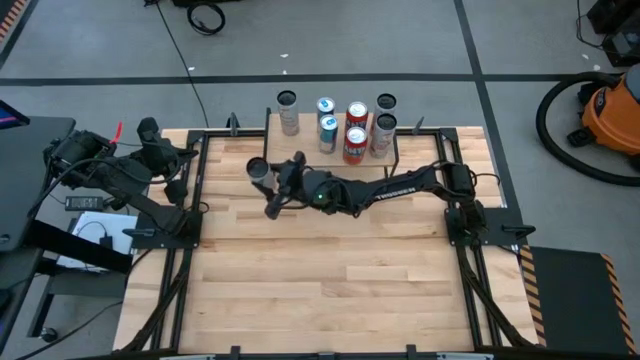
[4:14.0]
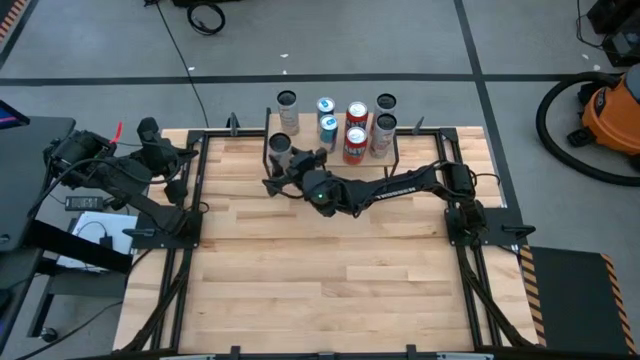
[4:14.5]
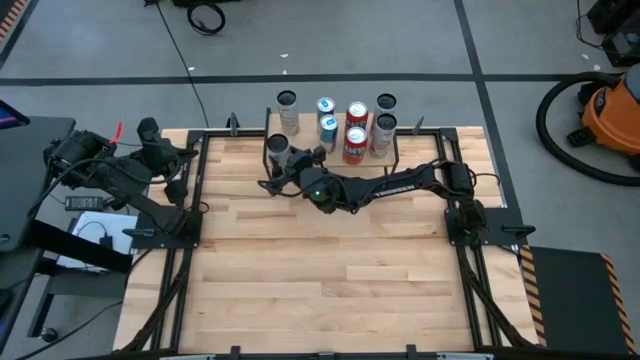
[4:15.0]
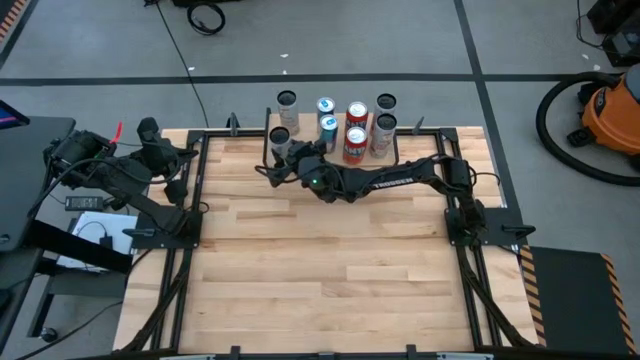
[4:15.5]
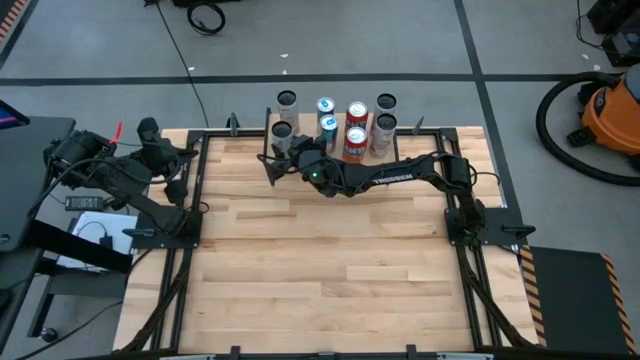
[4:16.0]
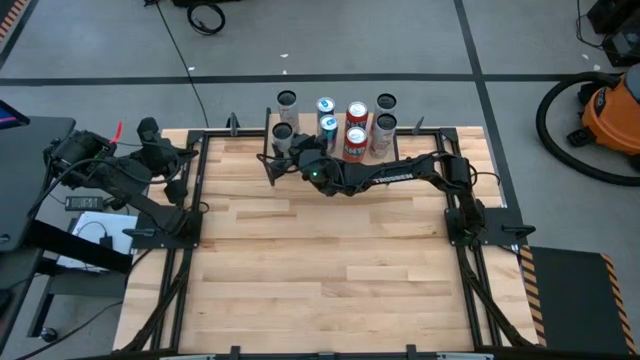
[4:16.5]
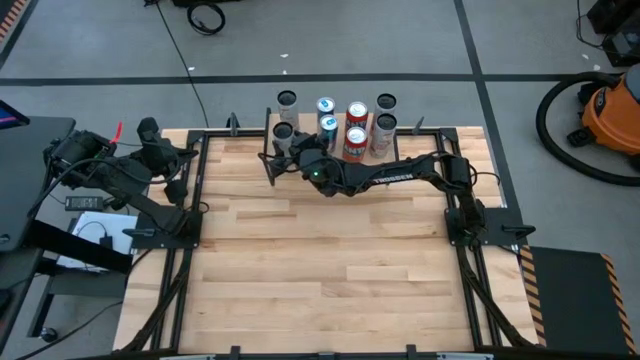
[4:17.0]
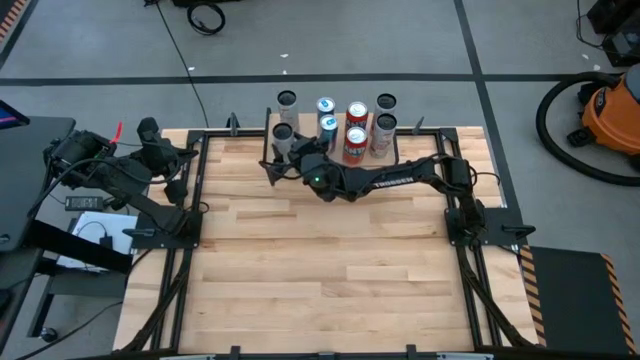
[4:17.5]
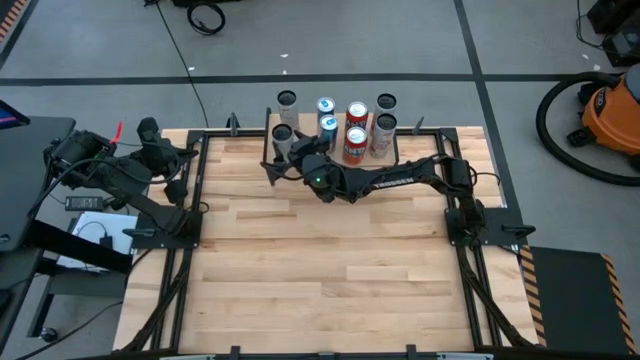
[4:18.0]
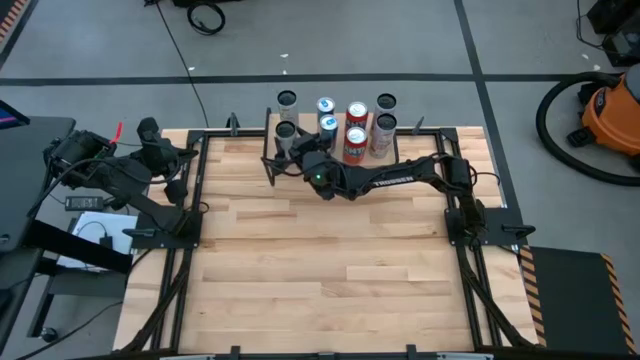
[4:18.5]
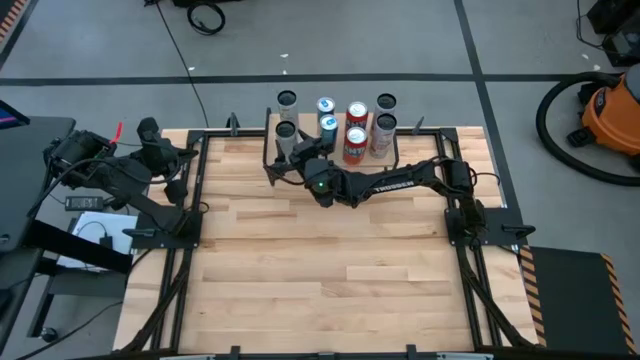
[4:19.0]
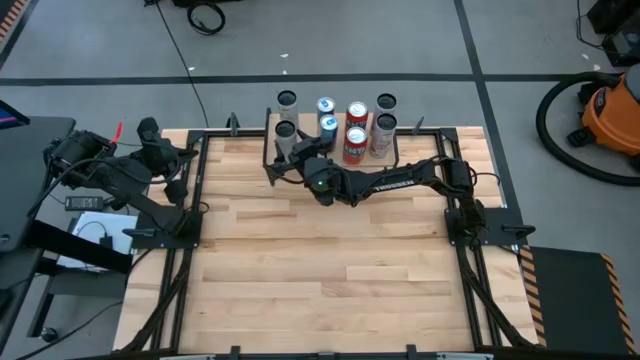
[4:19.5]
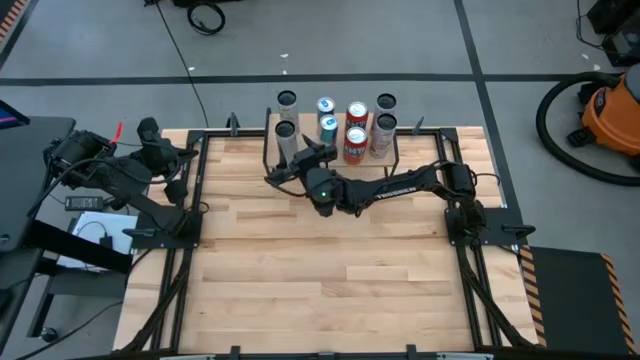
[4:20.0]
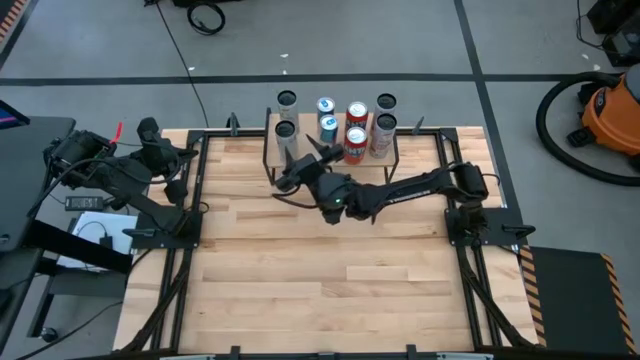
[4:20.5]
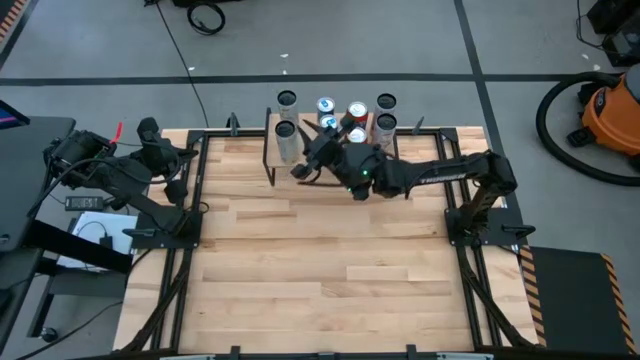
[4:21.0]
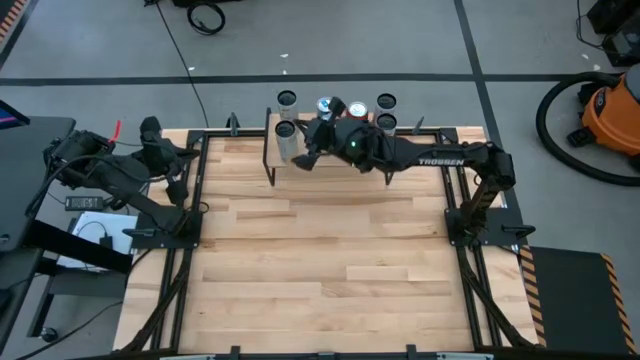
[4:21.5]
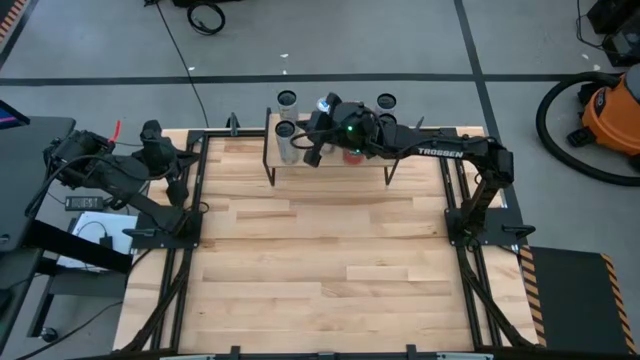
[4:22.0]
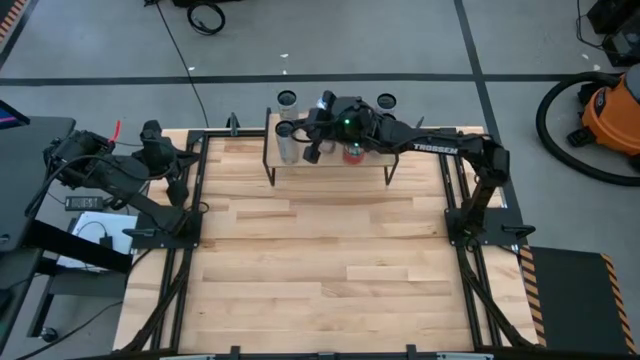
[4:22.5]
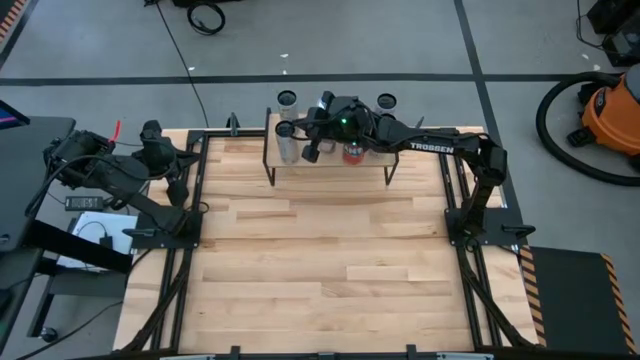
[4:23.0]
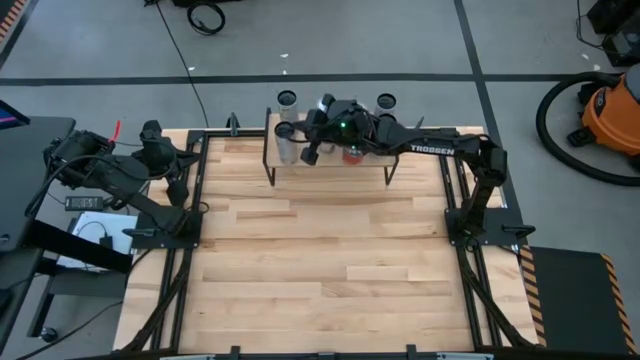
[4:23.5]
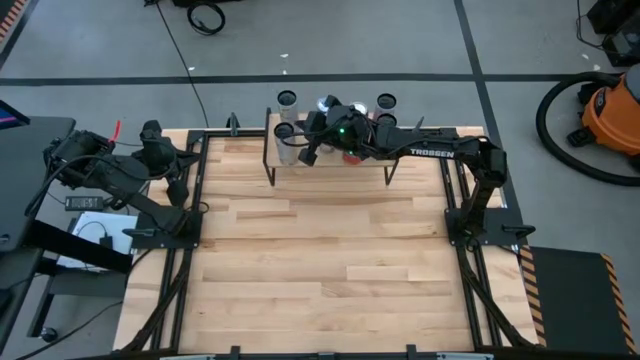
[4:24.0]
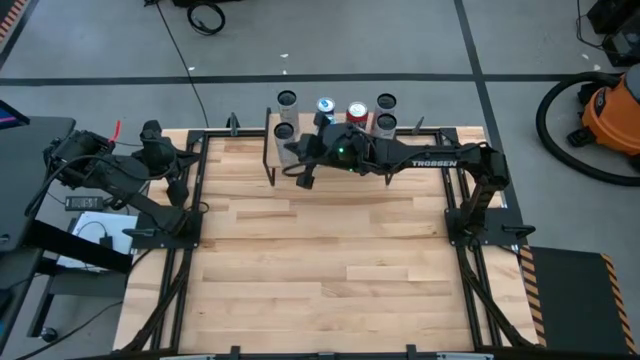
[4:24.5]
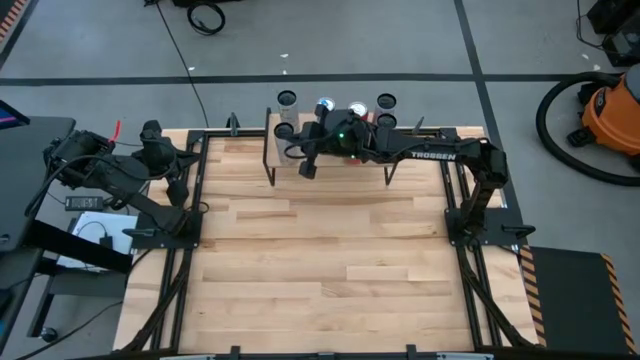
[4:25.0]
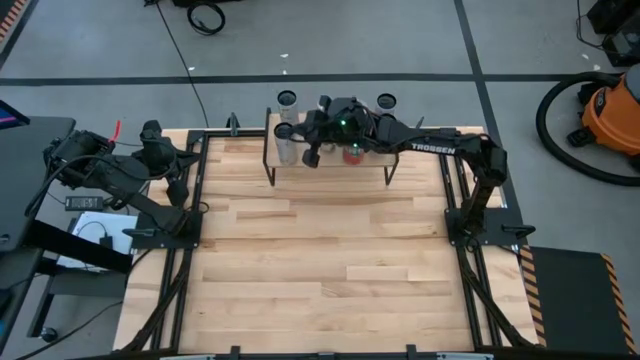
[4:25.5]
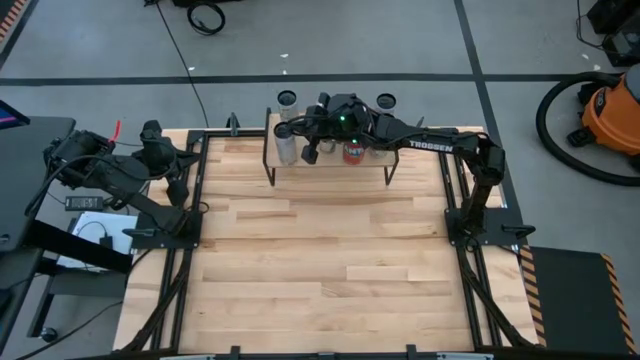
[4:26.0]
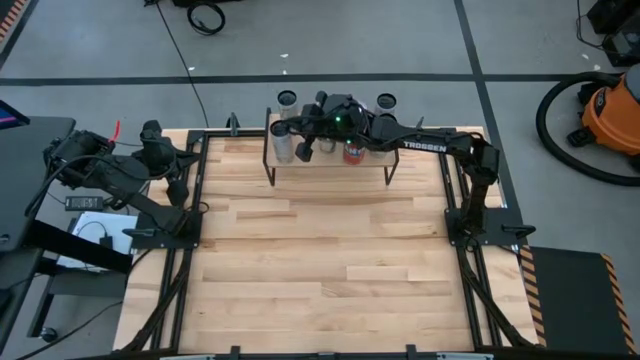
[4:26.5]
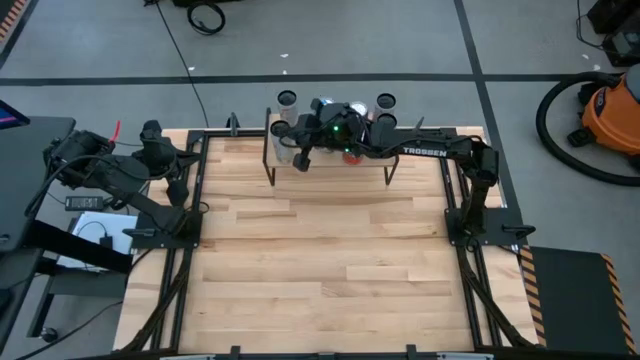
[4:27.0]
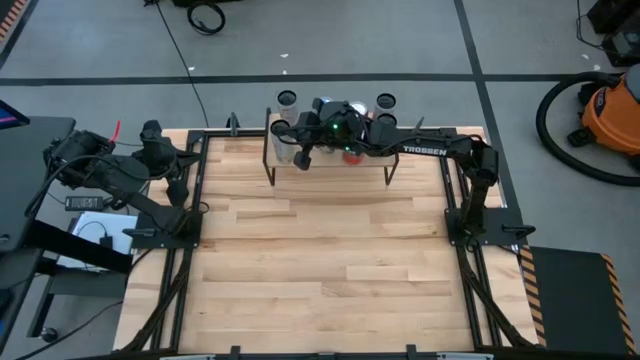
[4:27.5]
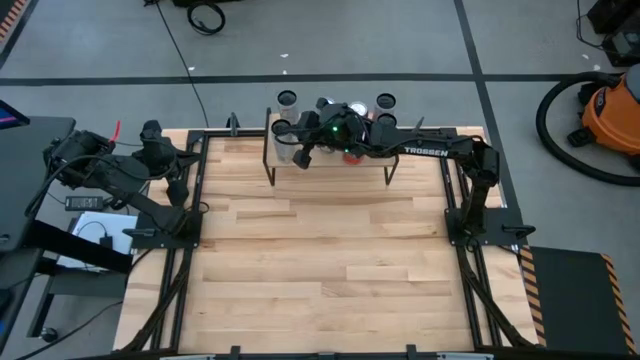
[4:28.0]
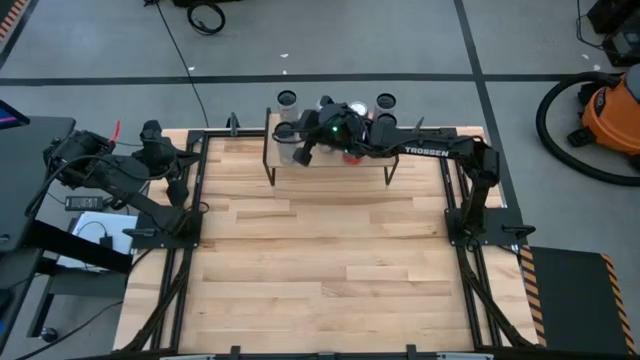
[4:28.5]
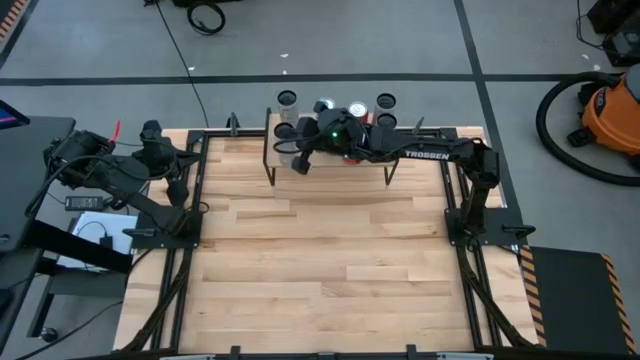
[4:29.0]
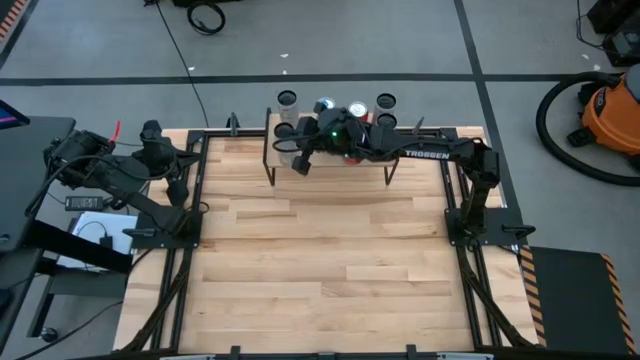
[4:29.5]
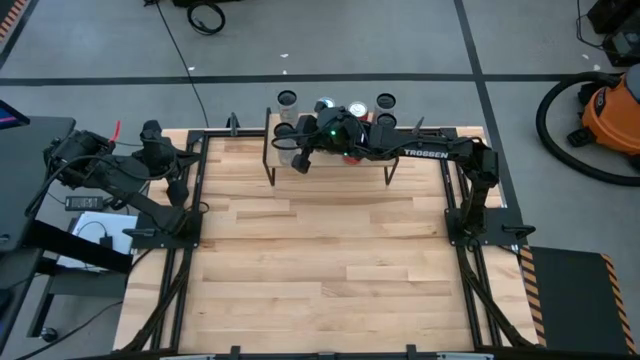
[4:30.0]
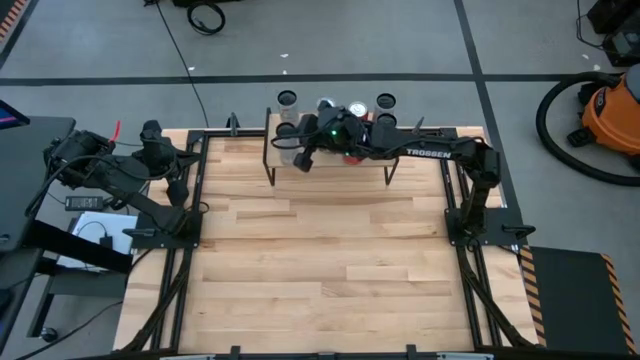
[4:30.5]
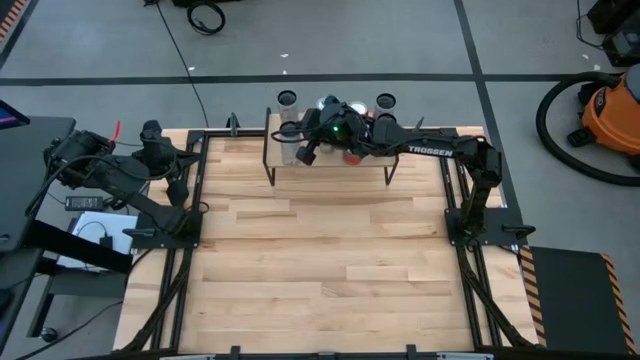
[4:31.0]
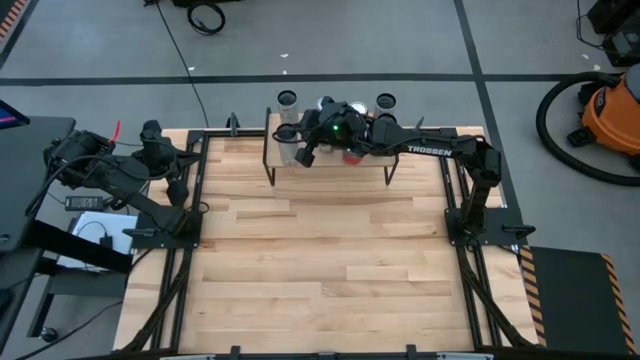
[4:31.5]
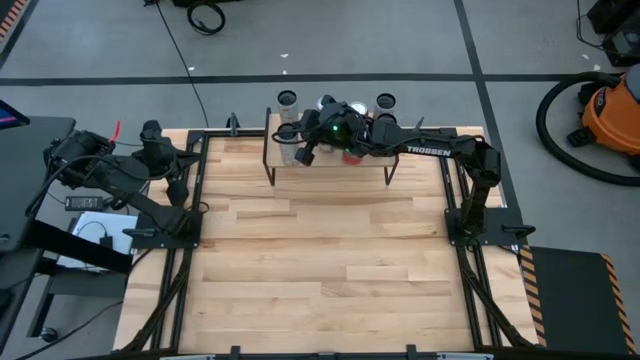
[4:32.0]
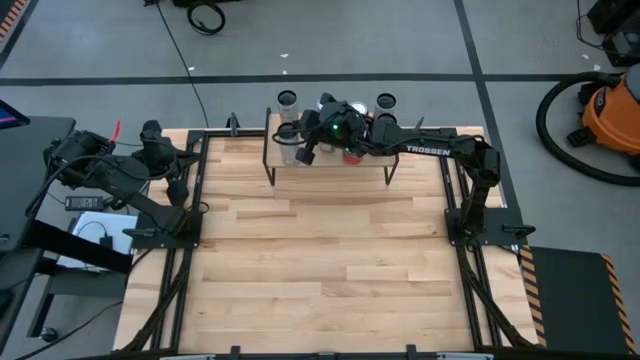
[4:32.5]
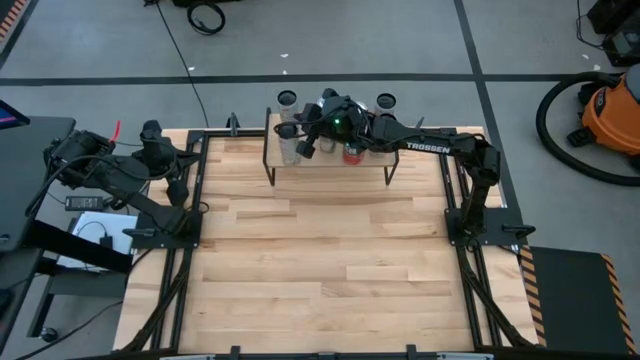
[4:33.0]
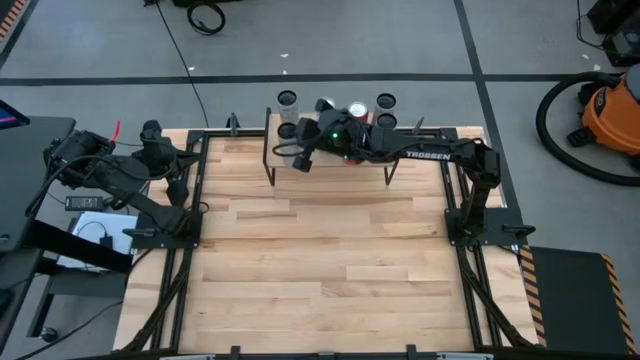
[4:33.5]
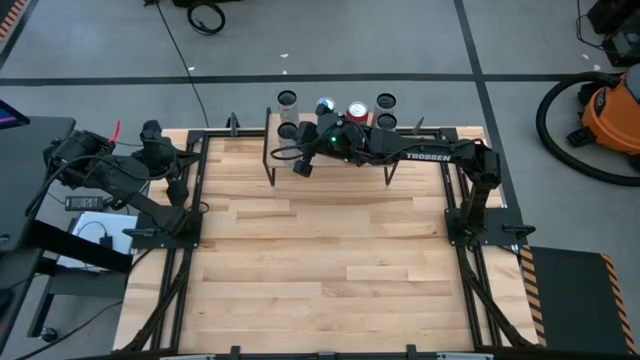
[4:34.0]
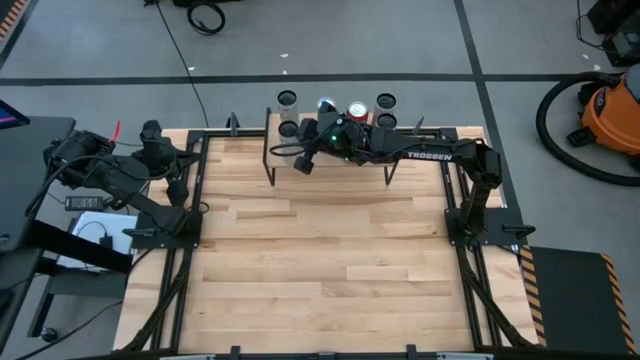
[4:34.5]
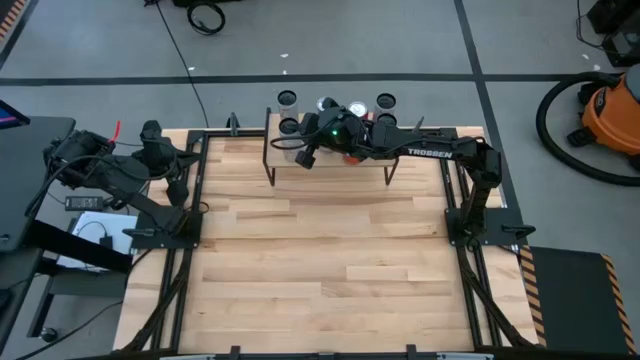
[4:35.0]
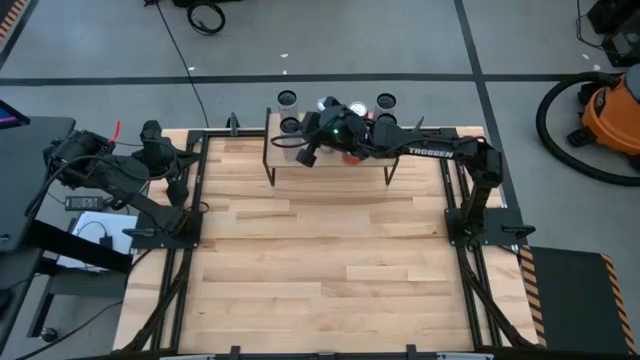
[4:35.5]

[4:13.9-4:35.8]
Task: Place canned beverage on shelf
Adjust the soda cans on the shelf
